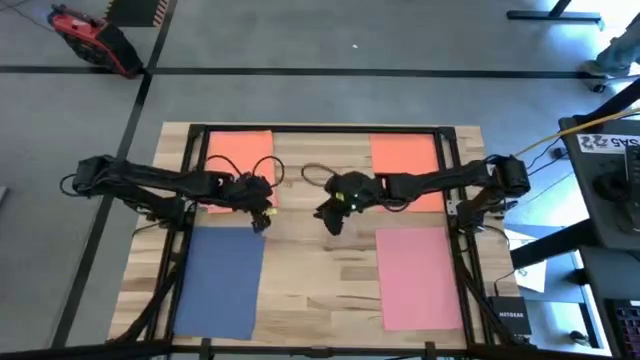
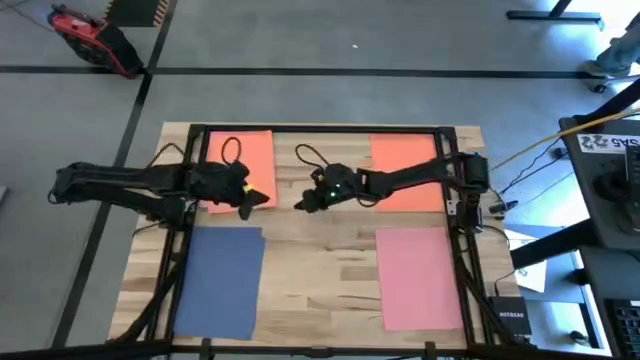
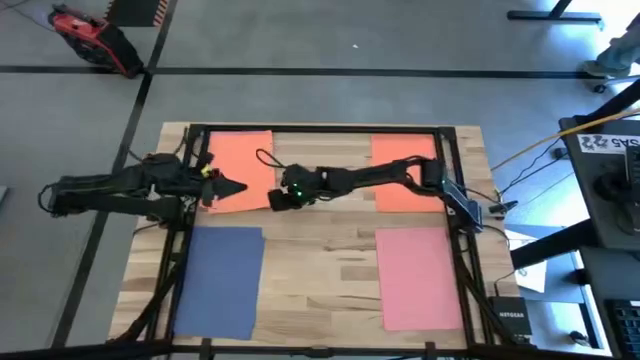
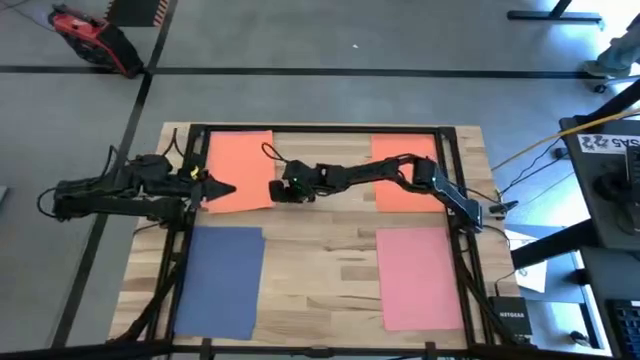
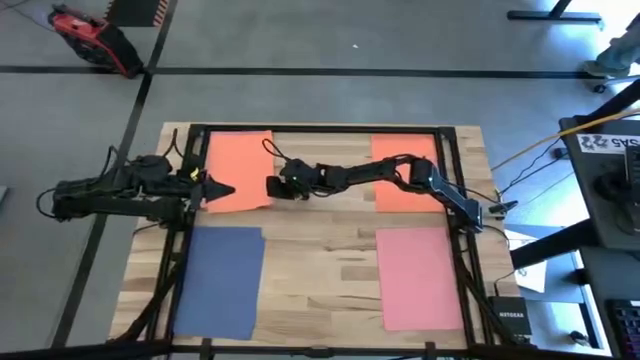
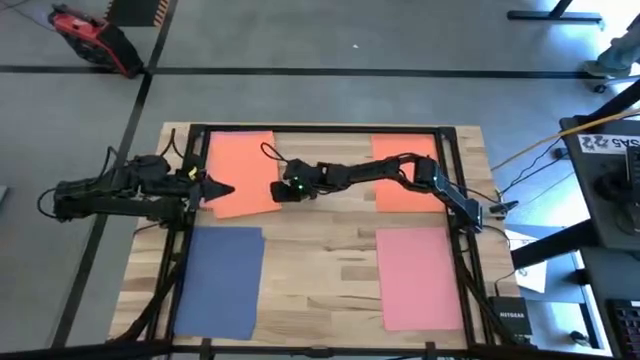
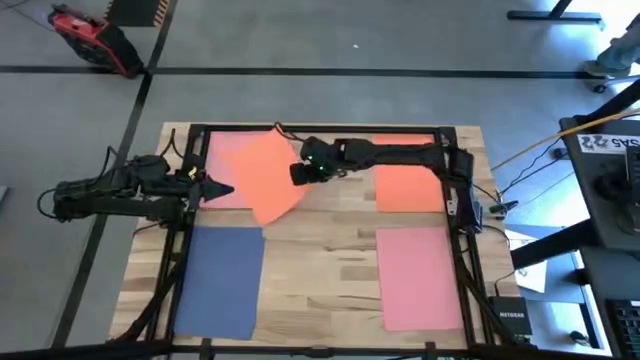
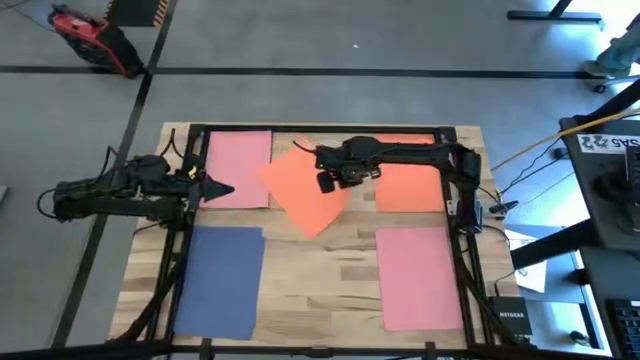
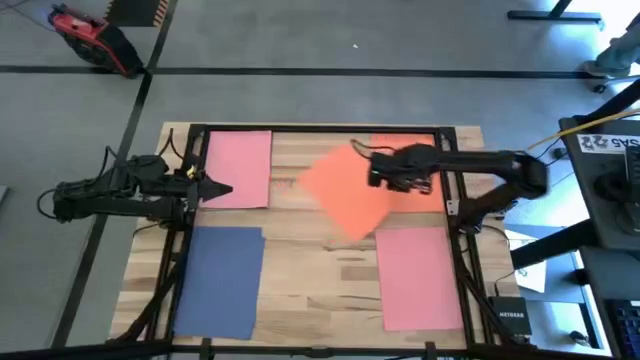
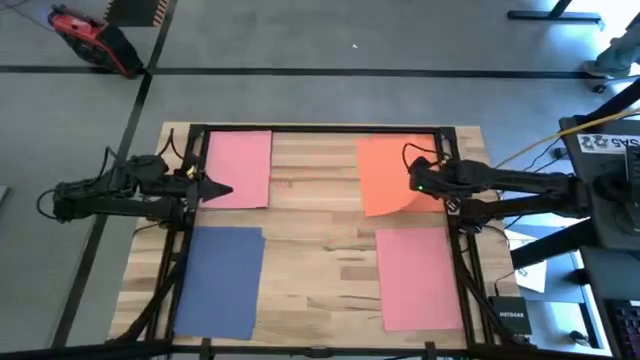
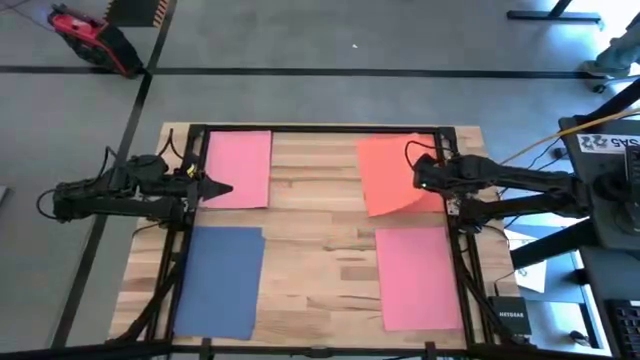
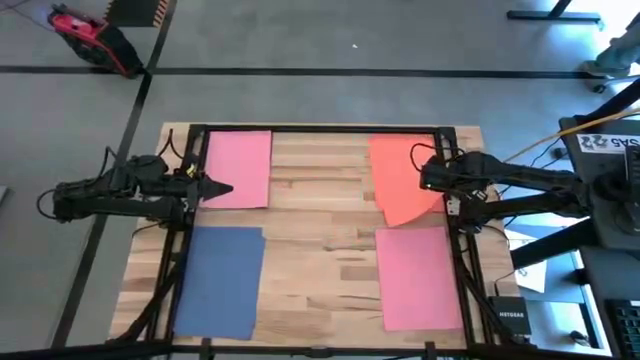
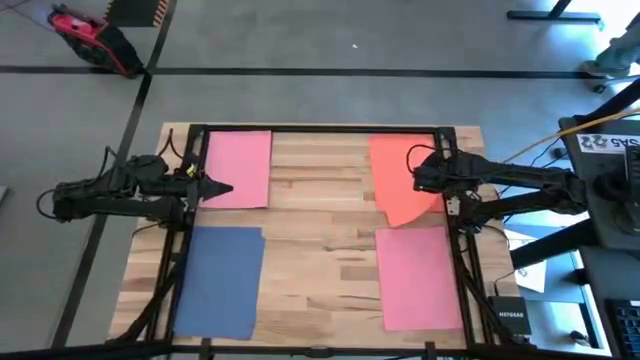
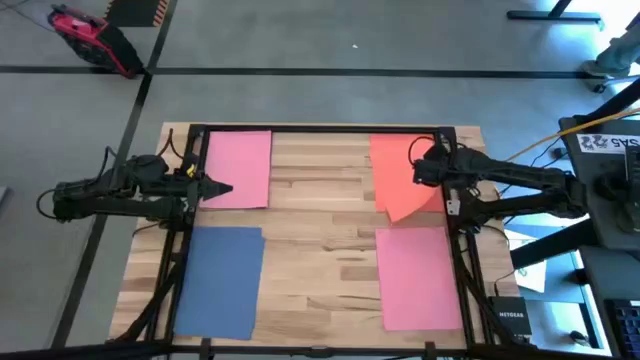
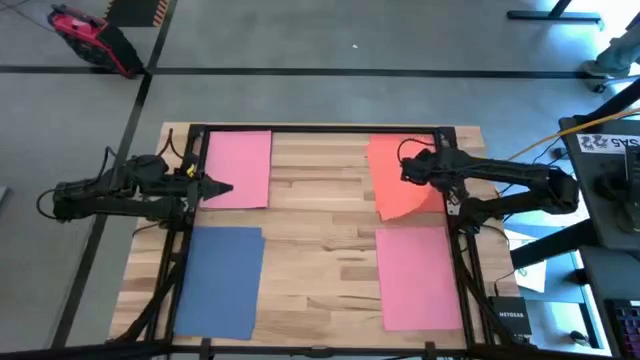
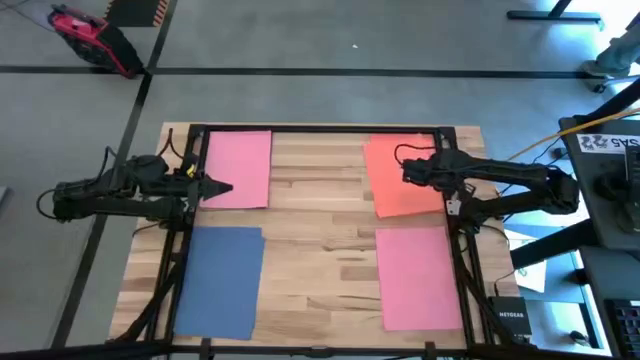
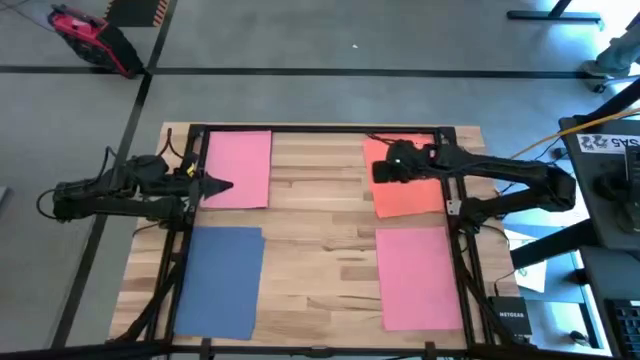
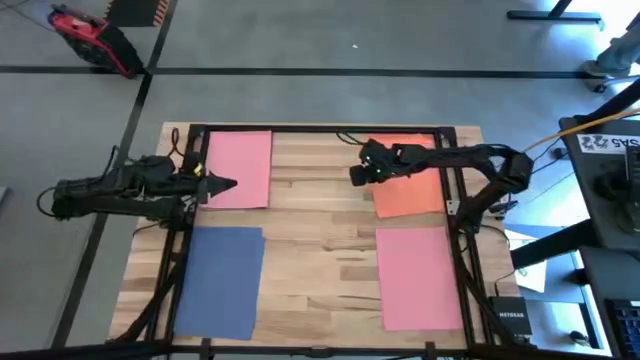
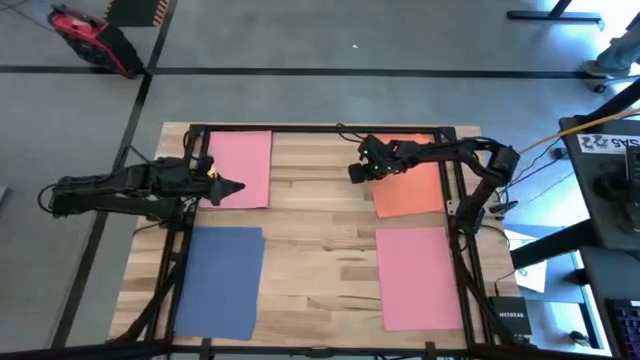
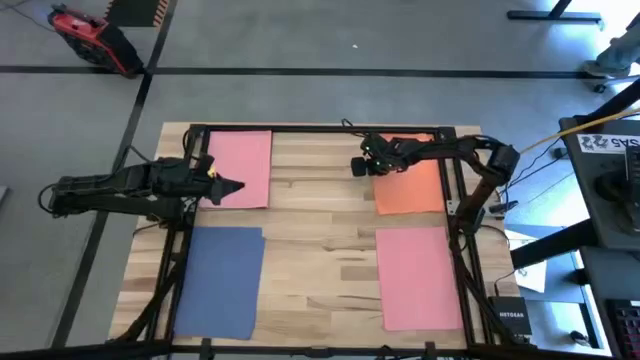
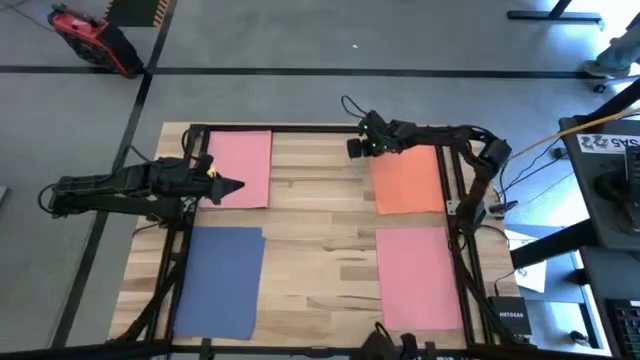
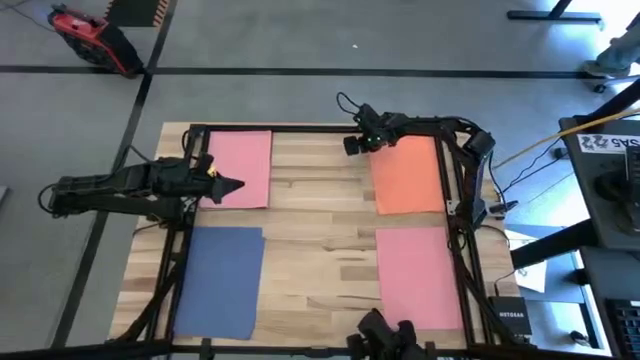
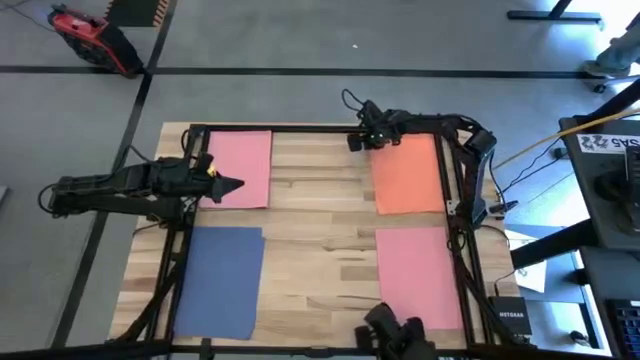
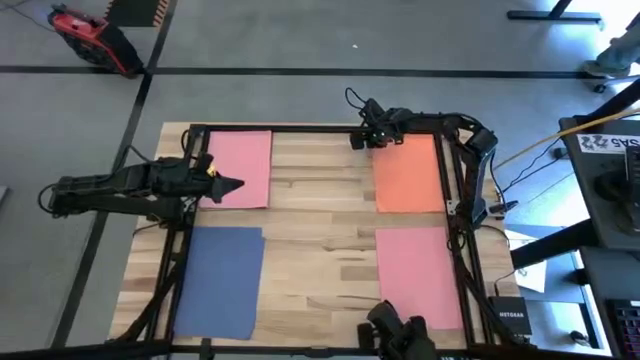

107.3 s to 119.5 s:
Task: Organize paper
Stack the orange colored paper on top of the orange colored papers

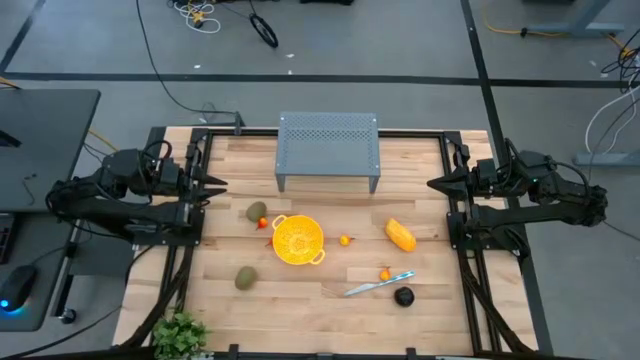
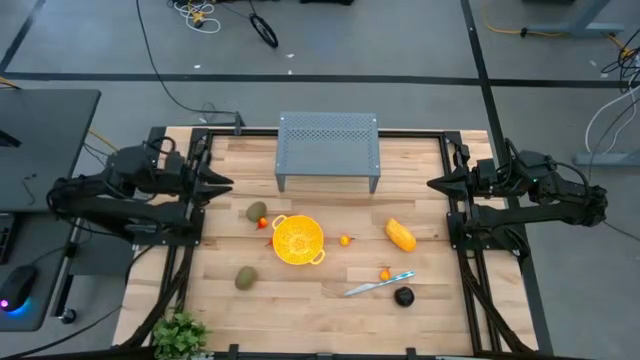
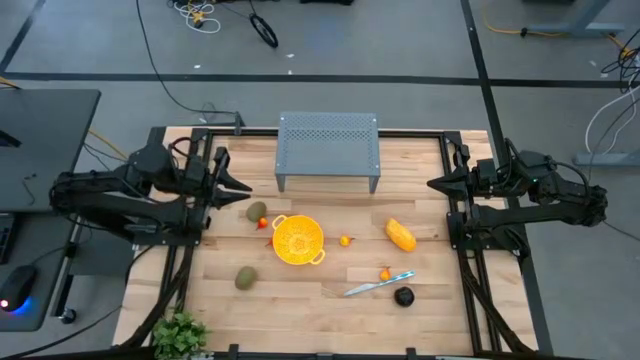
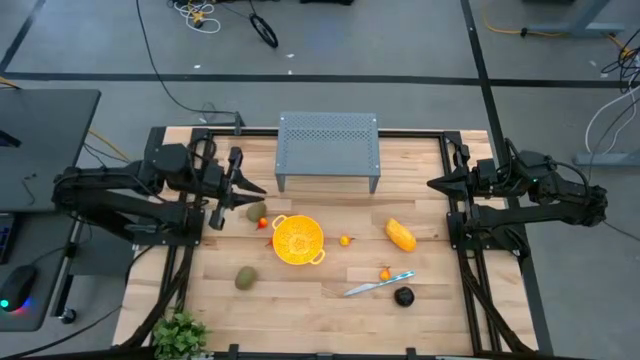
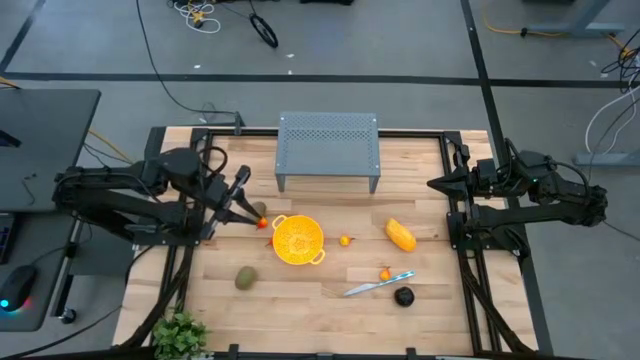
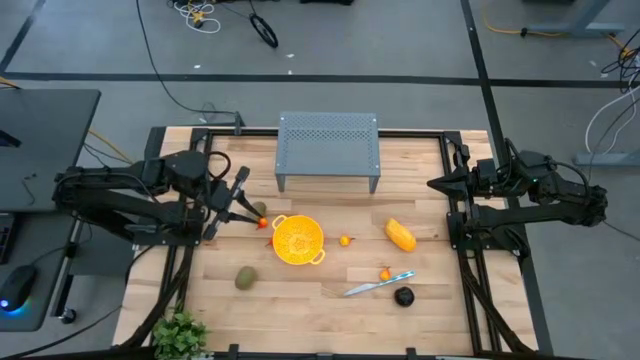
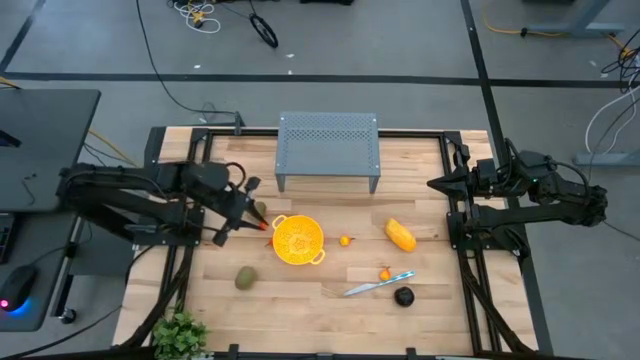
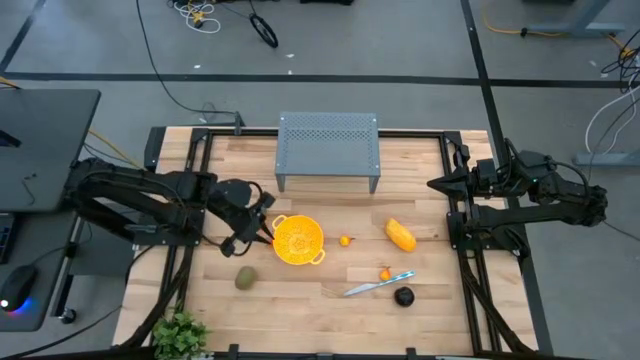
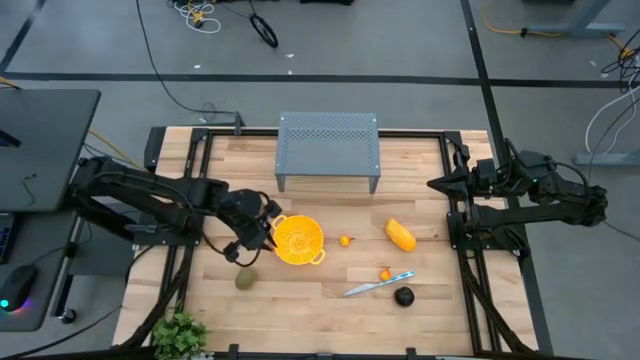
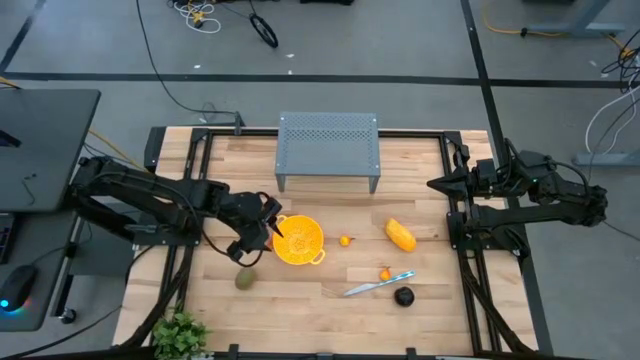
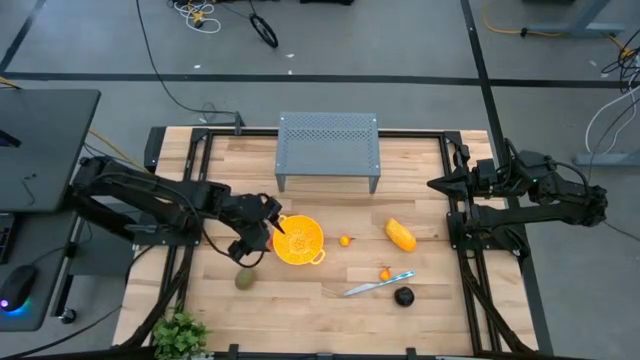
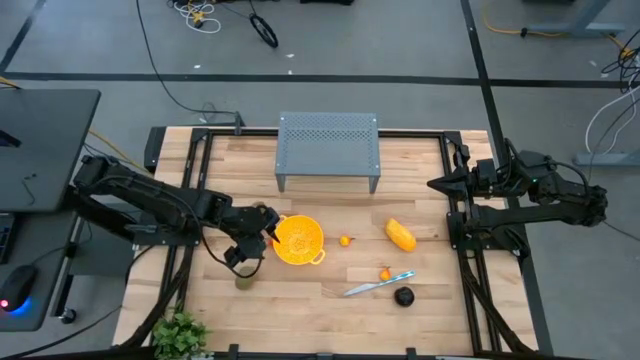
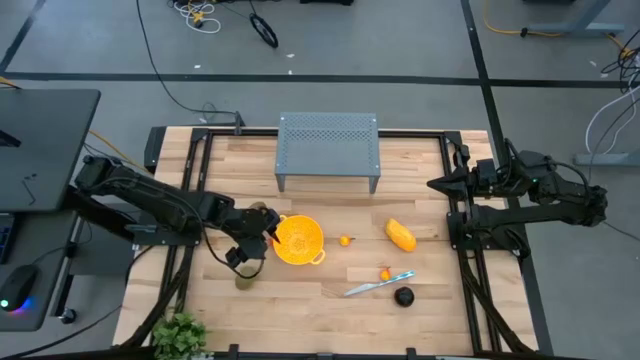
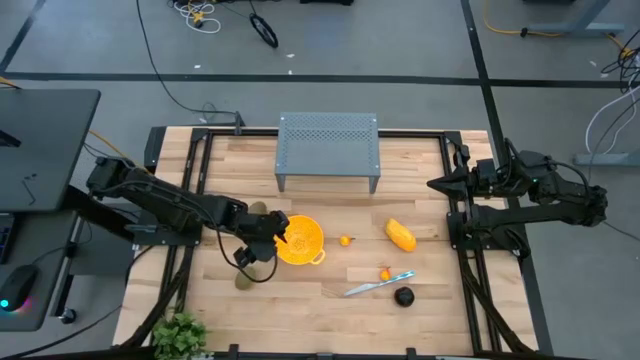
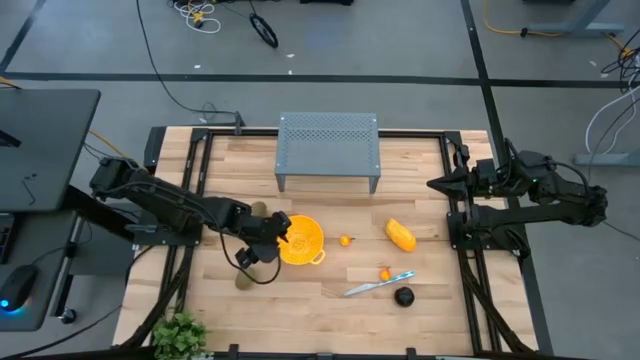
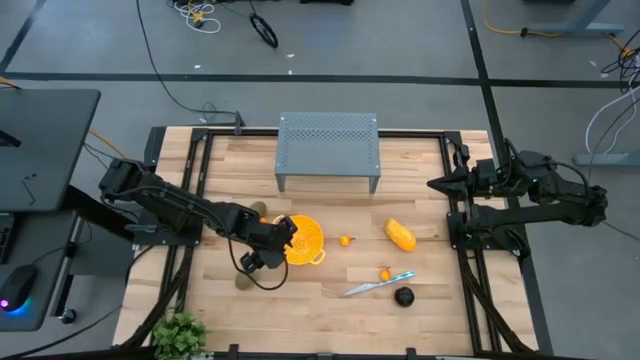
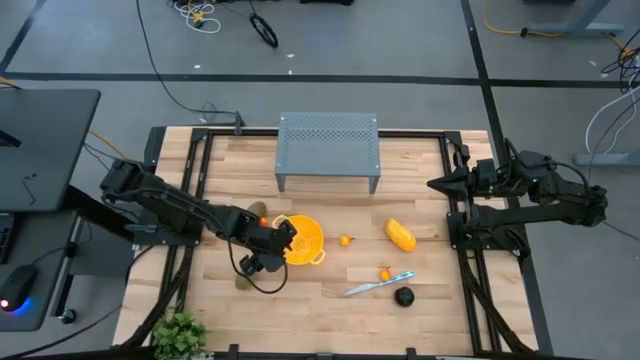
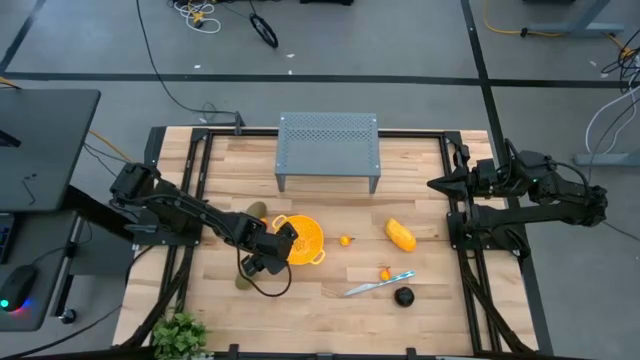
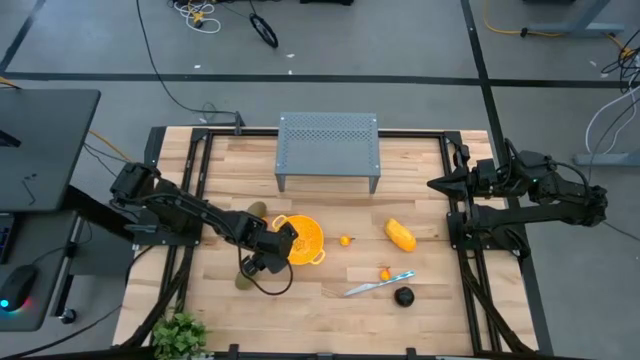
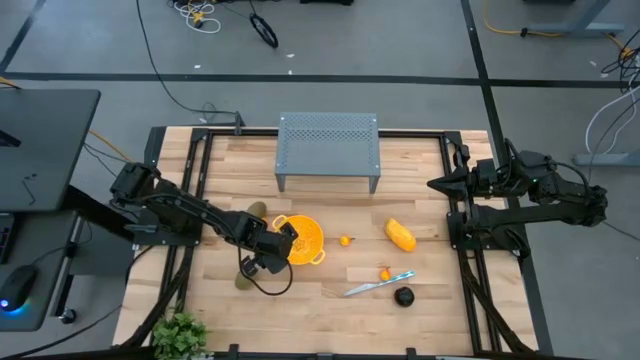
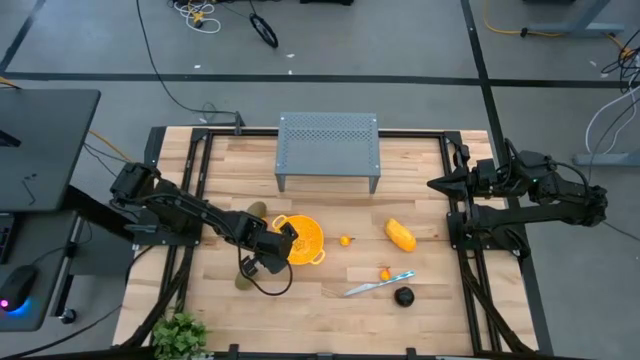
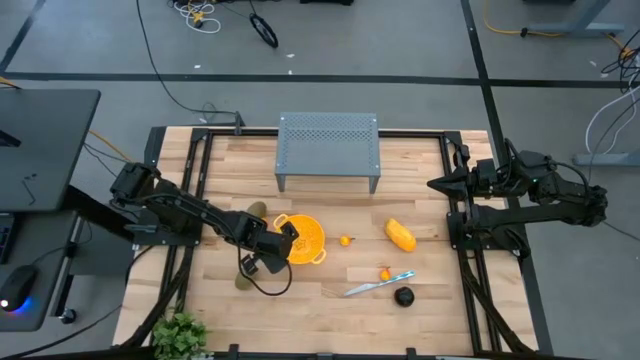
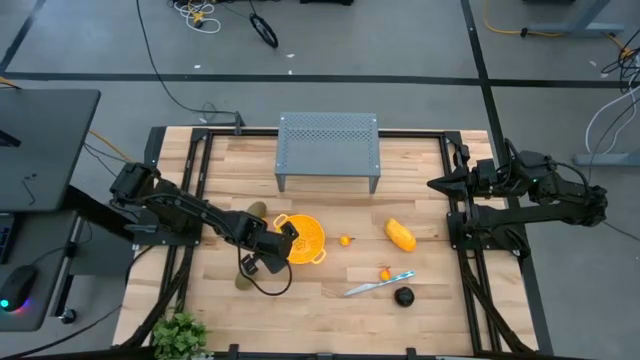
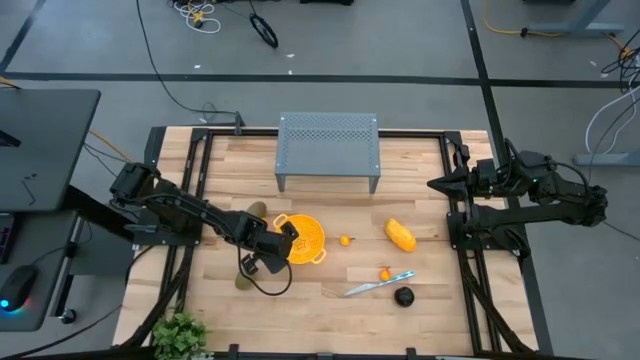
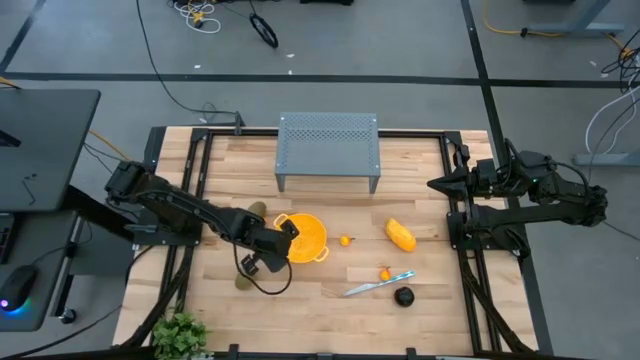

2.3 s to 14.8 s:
Task: Pick & Place Fruit
Put the yellow strainer bowl on the shelf
